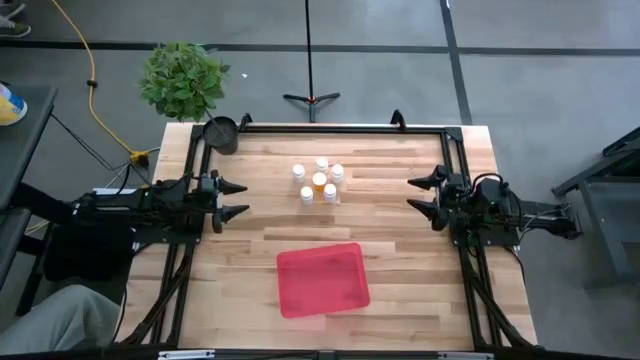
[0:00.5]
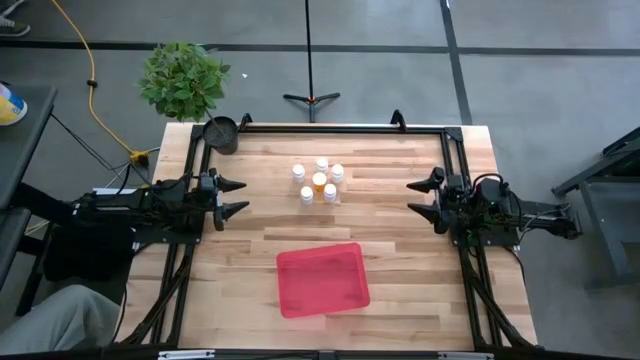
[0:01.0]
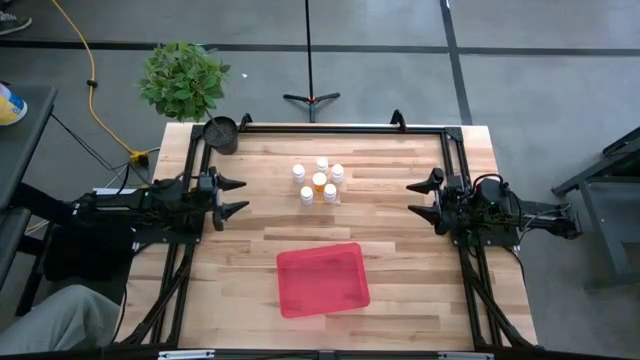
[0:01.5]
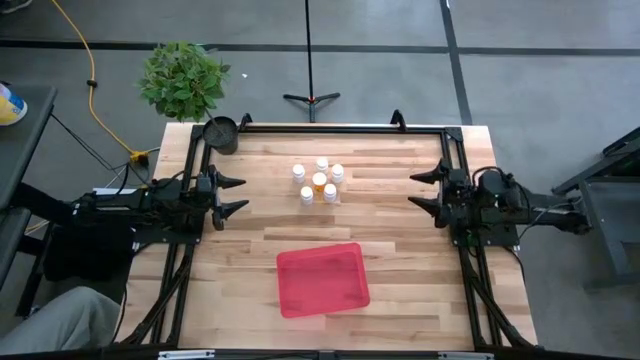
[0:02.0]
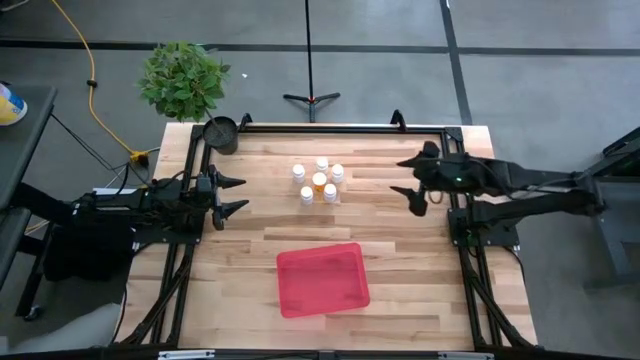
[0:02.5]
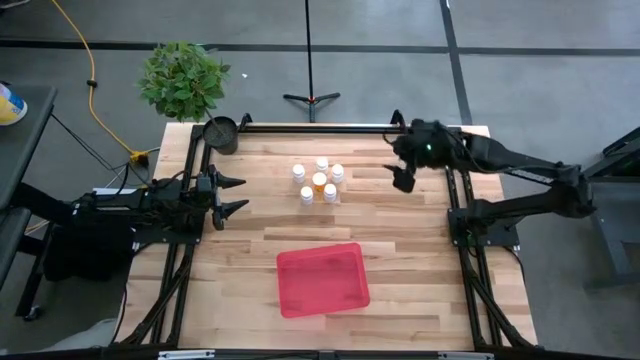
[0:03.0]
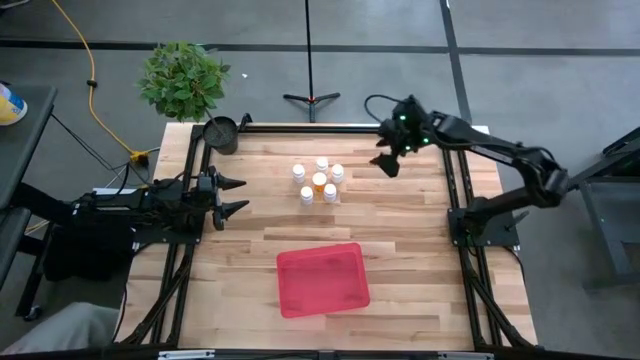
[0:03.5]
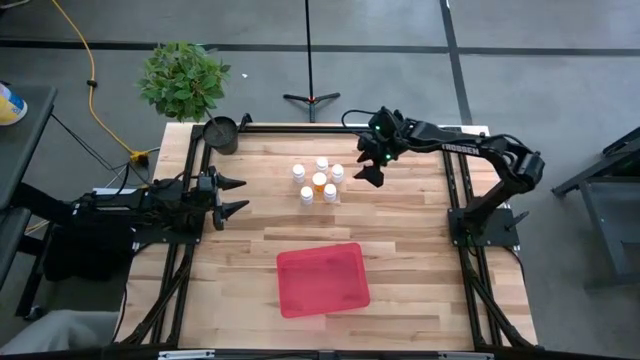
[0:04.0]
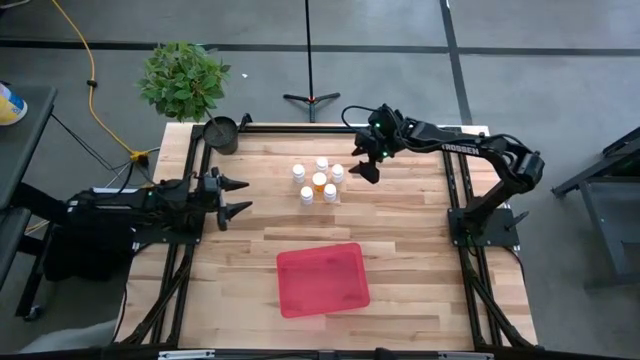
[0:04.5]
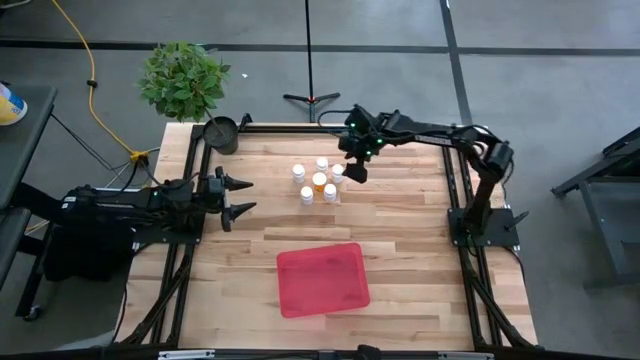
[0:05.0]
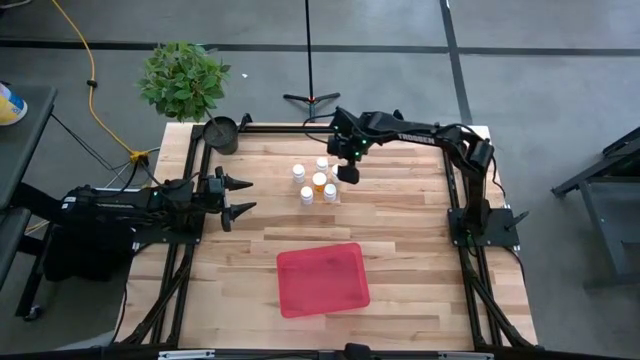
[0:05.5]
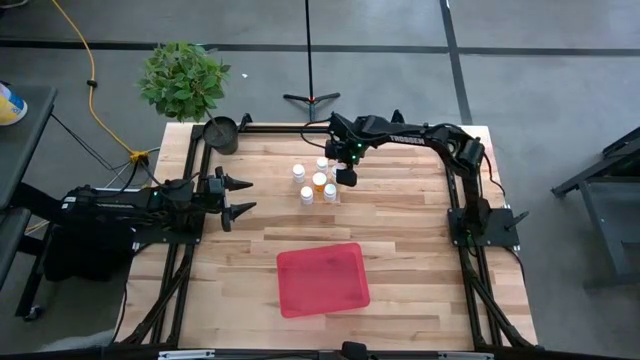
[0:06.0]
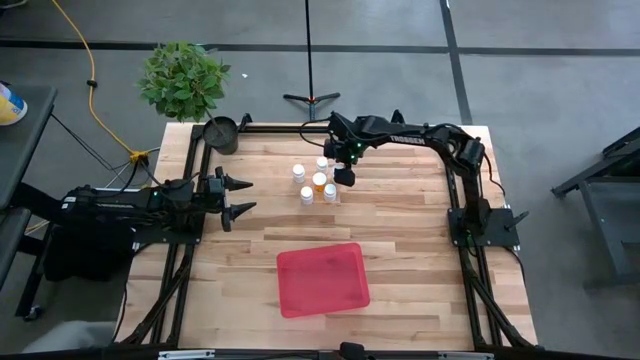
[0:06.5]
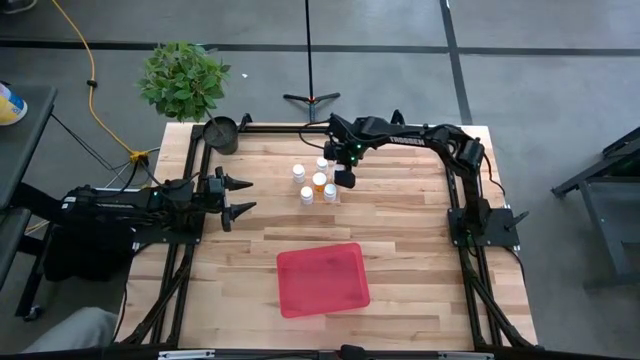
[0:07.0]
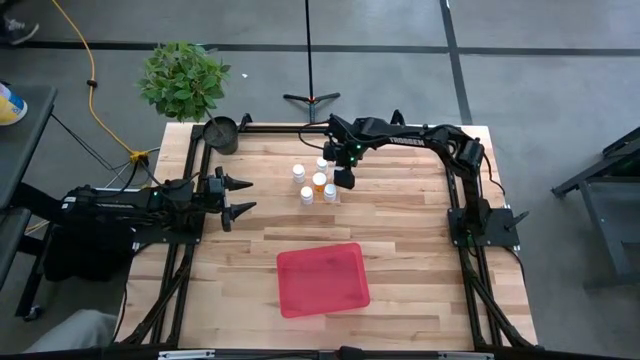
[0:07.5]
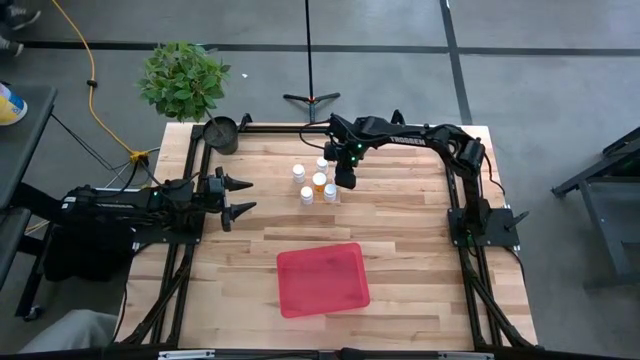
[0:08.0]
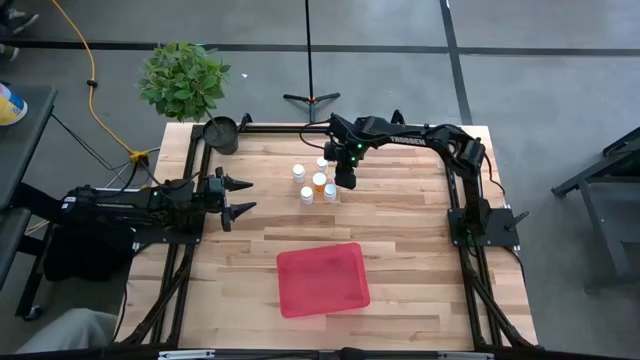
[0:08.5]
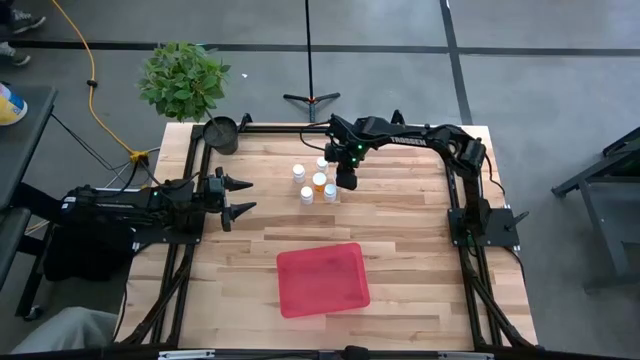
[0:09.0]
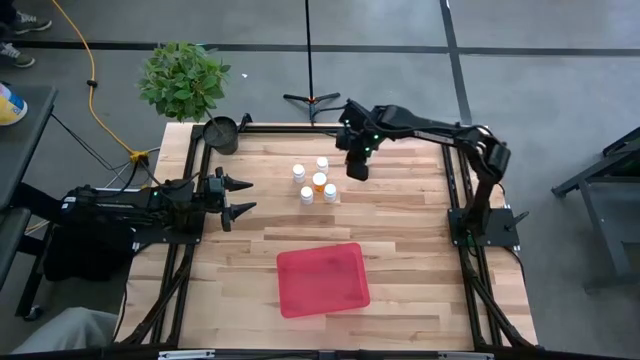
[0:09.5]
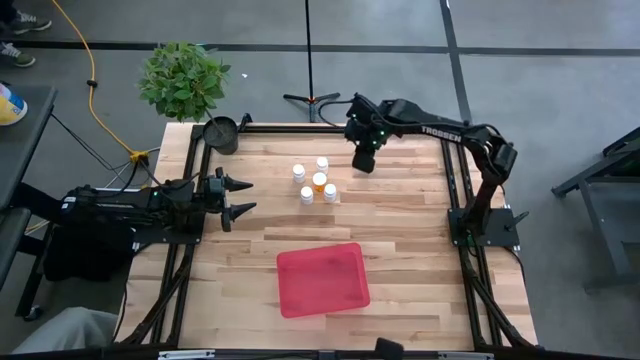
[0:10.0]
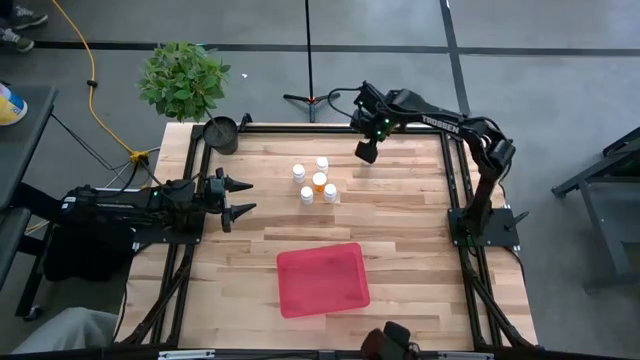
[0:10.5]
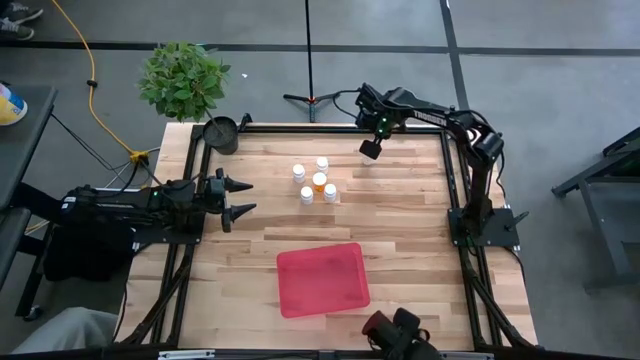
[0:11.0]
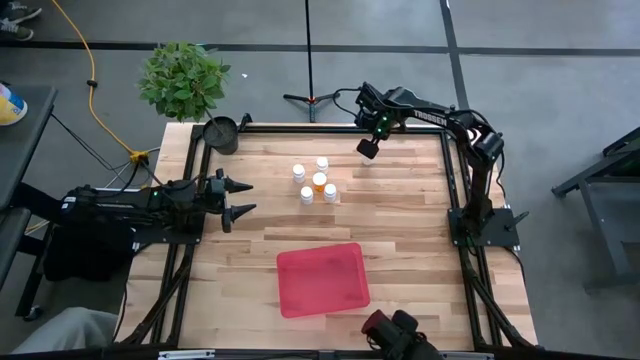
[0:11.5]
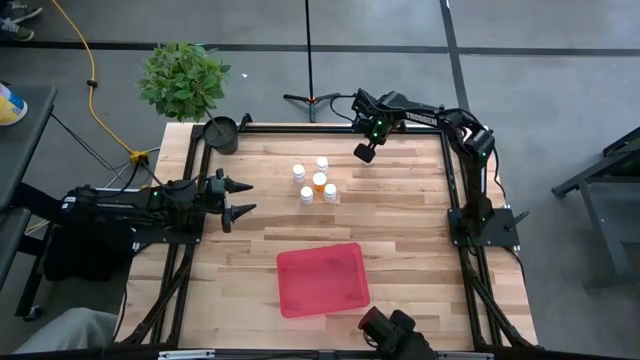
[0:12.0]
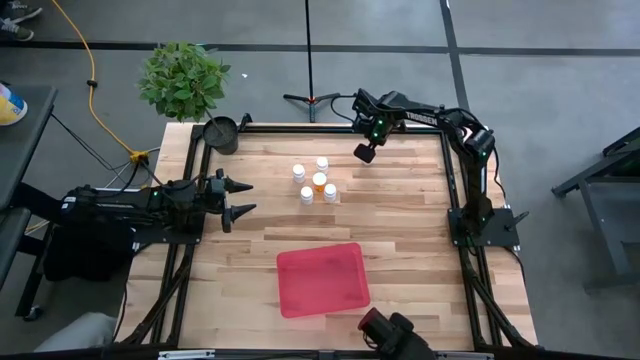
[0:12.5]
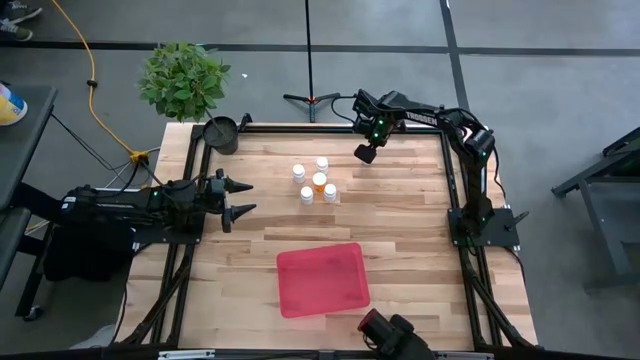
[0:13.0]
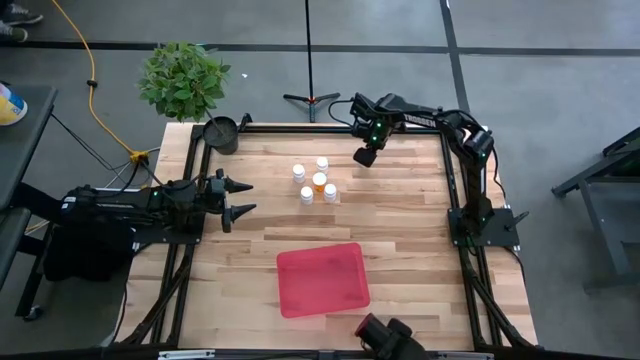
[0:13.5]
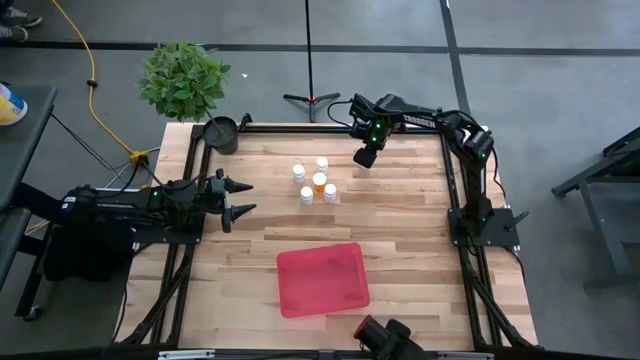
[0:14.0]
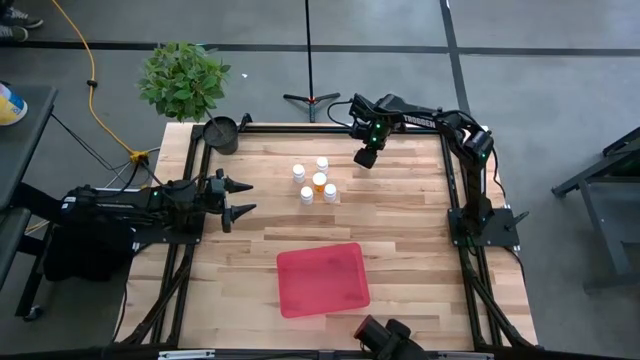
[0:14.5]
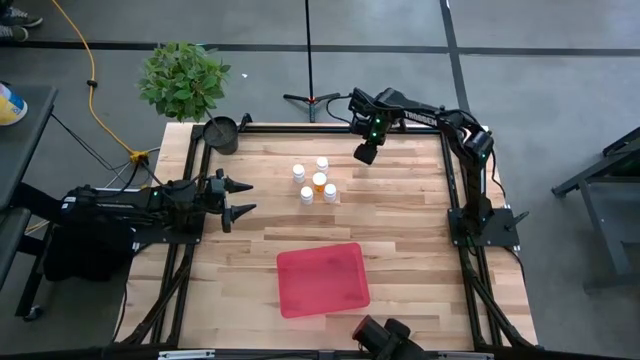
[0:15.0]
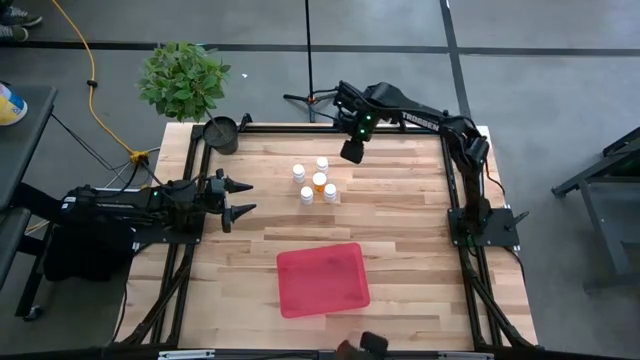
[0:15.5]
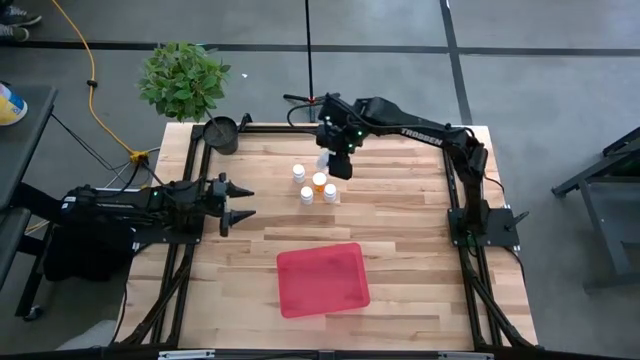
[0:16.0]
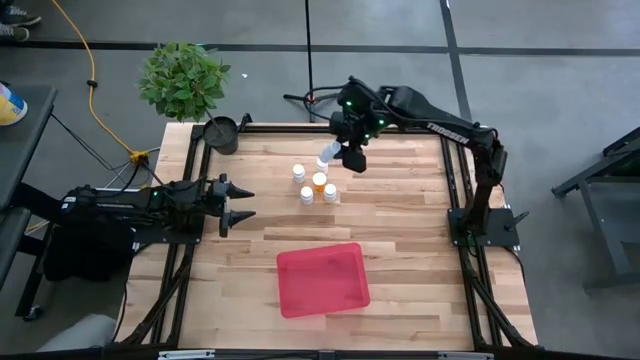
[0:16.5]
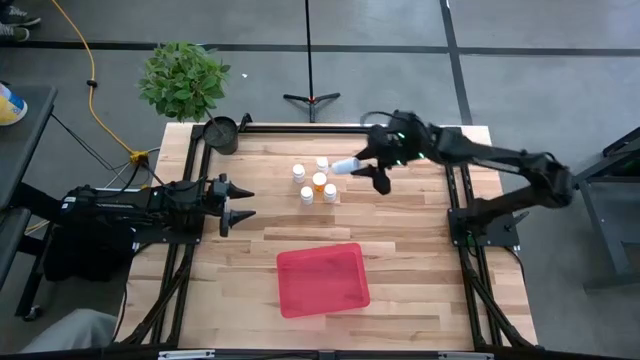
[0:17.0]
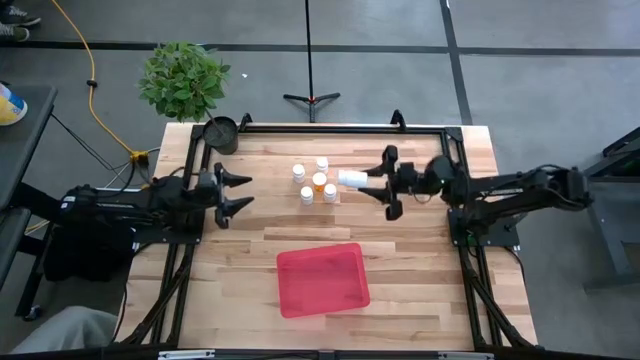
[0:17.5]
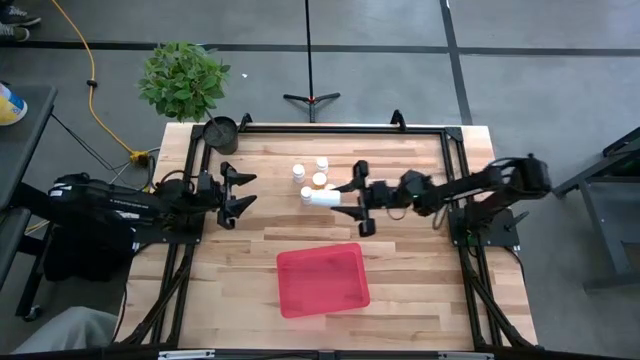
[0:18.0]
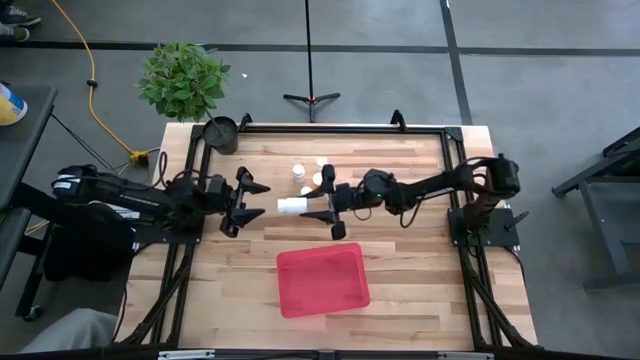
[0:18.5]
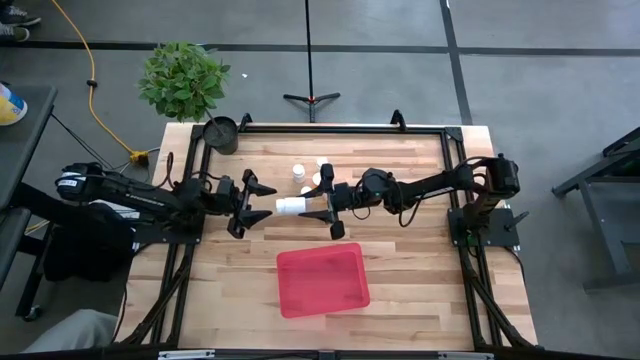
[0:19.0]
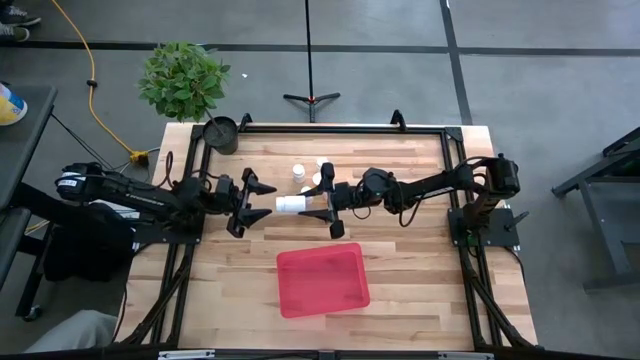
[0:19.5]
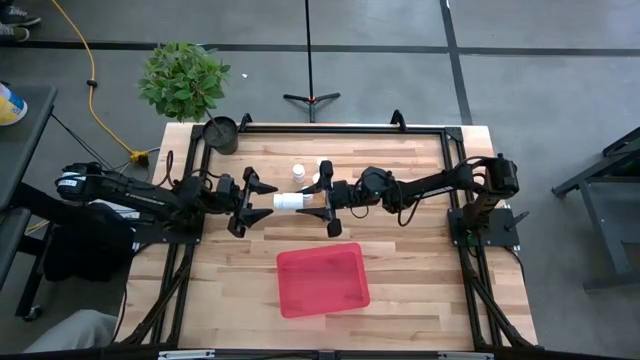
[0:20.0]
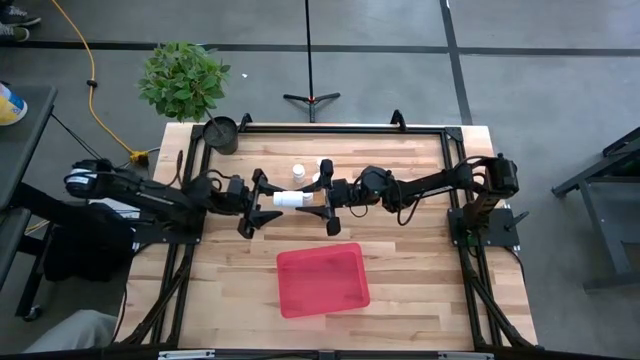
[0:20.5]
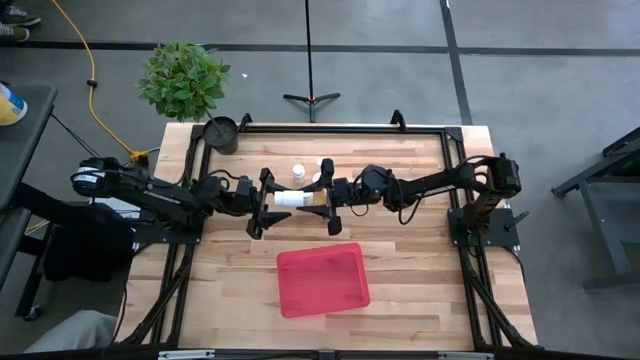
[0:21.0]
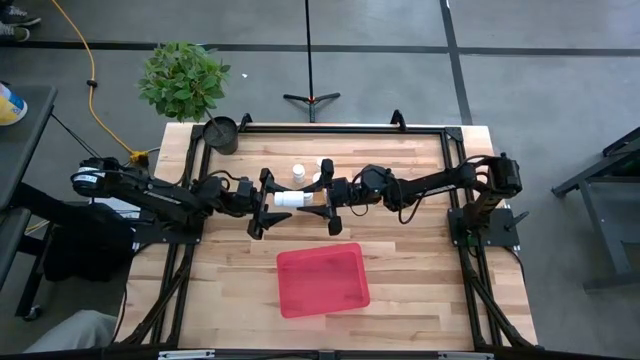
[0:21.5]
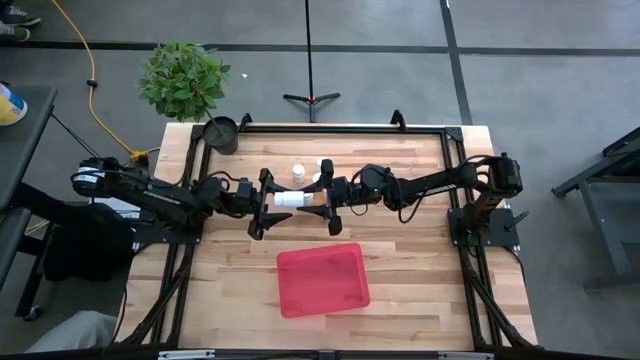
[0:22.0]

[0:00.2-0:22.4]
Task: Pick and place pill bottles into a basket
Put the white pill bottle into the red bin
